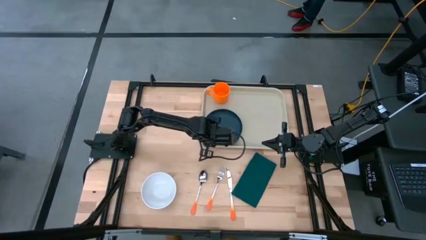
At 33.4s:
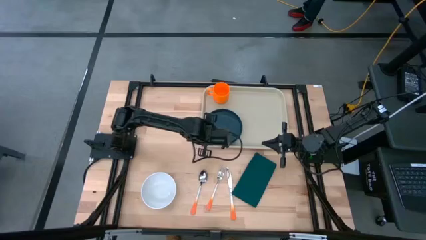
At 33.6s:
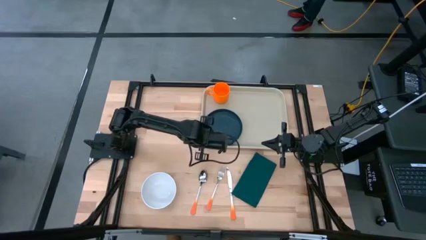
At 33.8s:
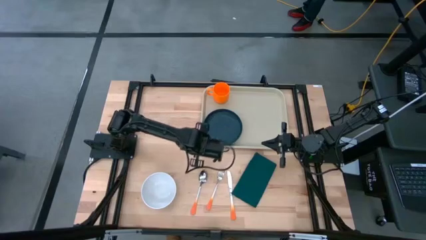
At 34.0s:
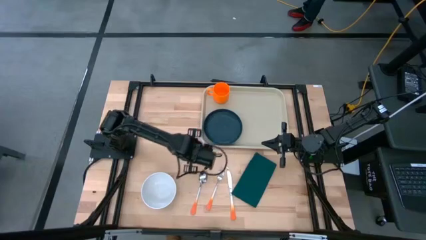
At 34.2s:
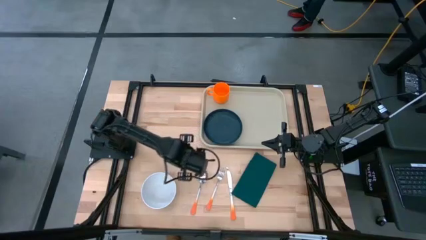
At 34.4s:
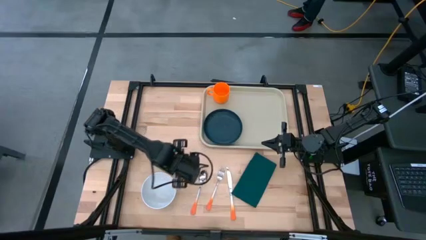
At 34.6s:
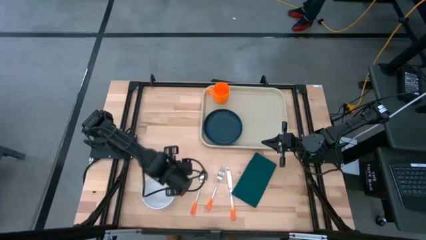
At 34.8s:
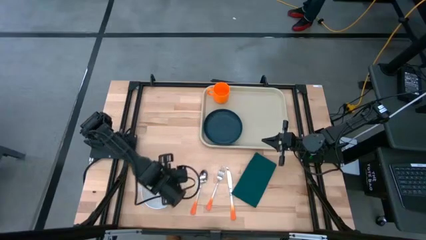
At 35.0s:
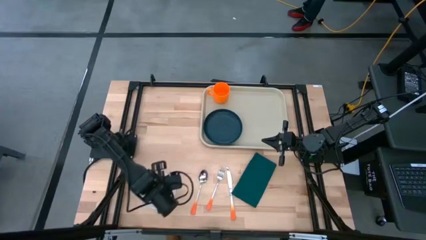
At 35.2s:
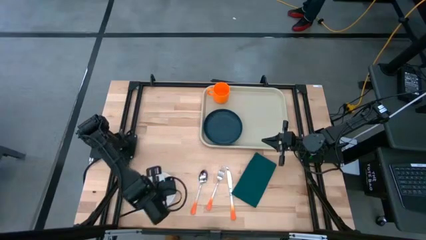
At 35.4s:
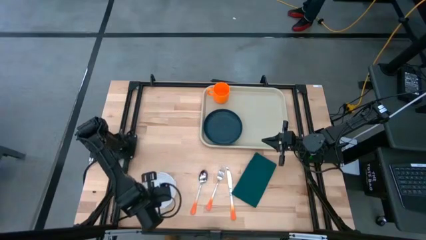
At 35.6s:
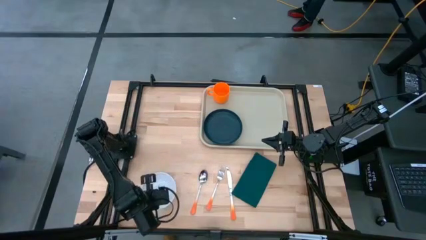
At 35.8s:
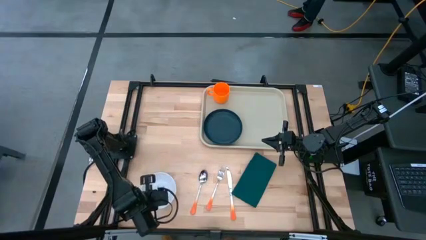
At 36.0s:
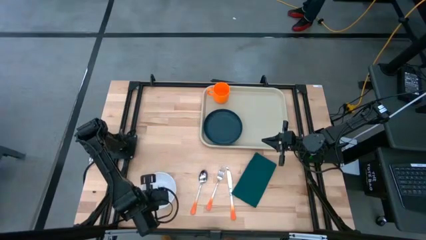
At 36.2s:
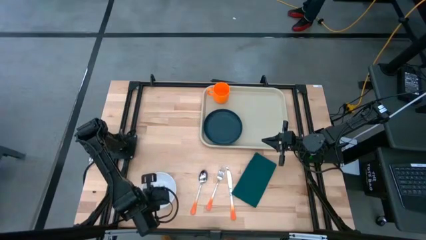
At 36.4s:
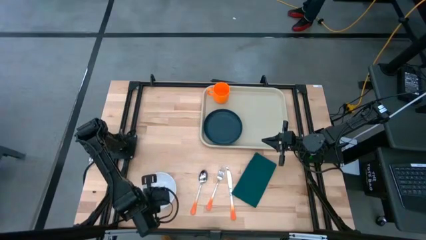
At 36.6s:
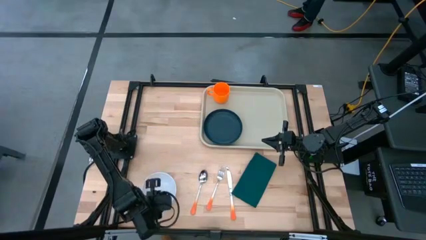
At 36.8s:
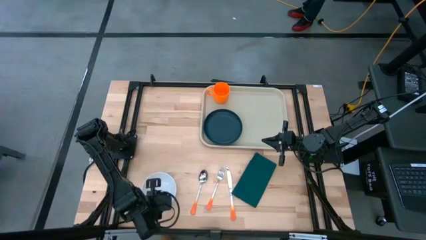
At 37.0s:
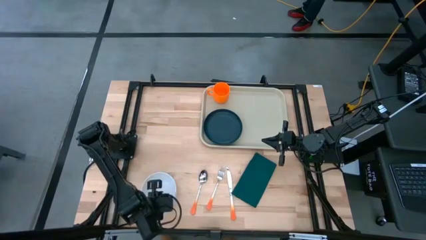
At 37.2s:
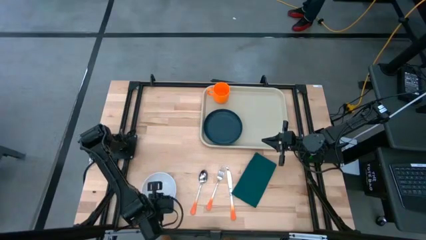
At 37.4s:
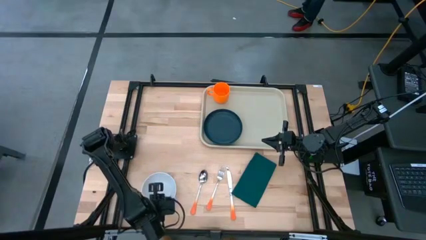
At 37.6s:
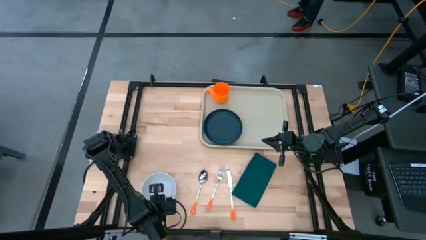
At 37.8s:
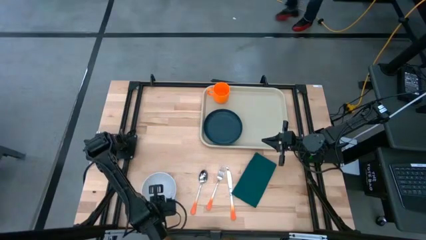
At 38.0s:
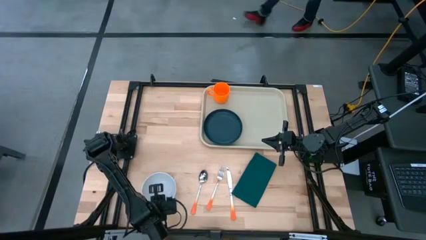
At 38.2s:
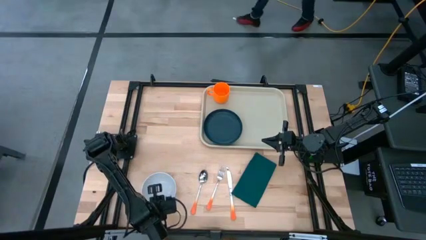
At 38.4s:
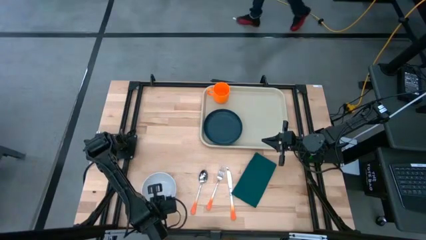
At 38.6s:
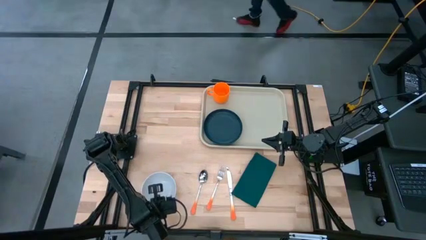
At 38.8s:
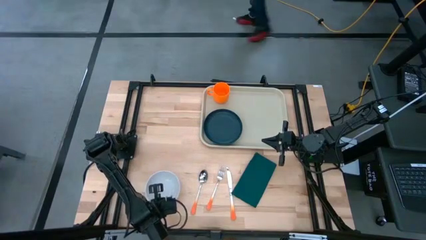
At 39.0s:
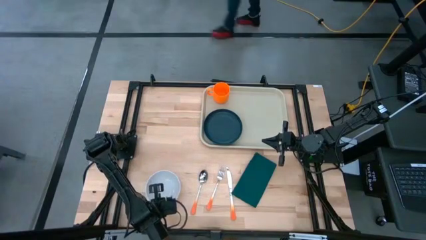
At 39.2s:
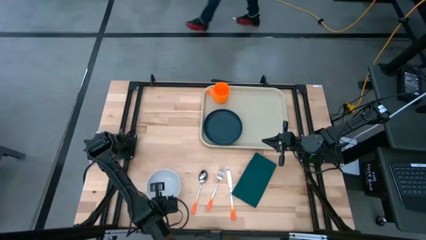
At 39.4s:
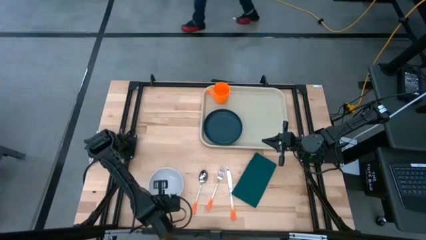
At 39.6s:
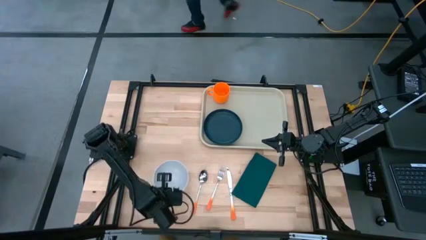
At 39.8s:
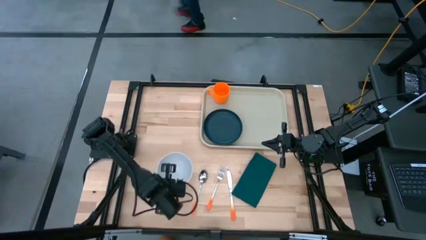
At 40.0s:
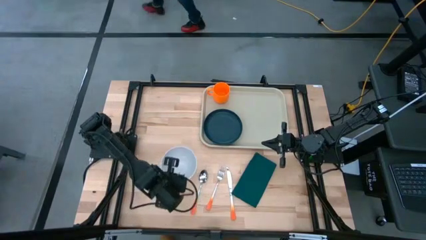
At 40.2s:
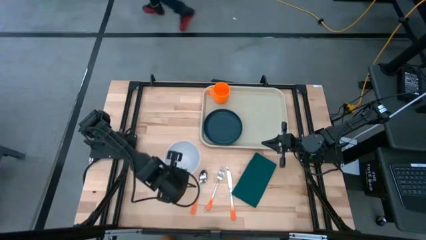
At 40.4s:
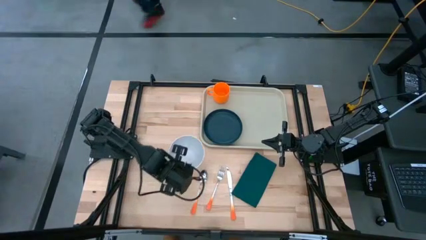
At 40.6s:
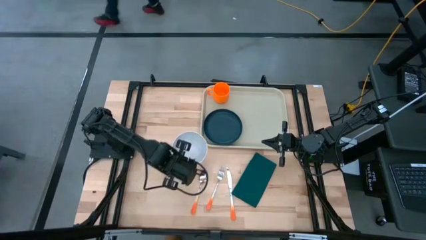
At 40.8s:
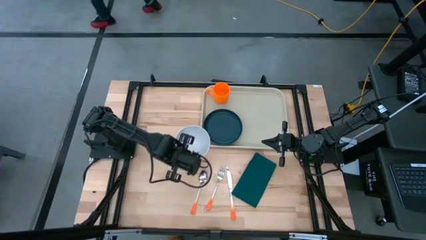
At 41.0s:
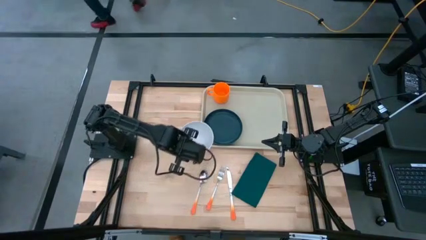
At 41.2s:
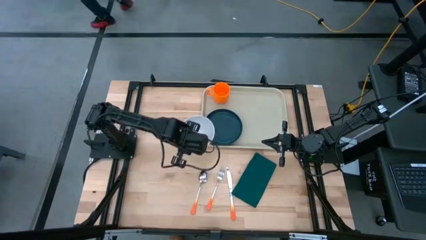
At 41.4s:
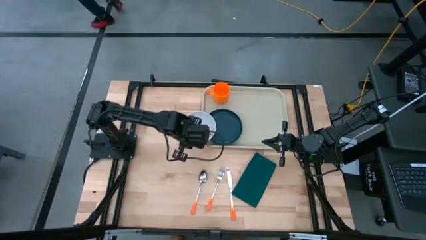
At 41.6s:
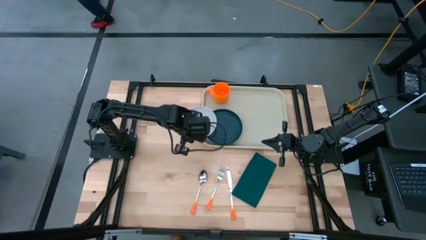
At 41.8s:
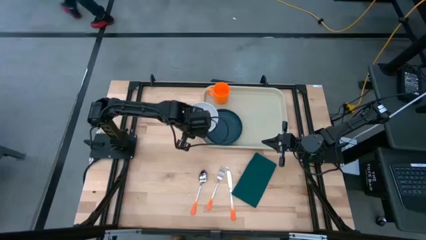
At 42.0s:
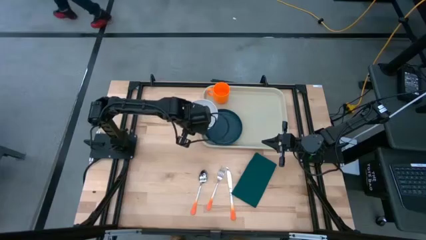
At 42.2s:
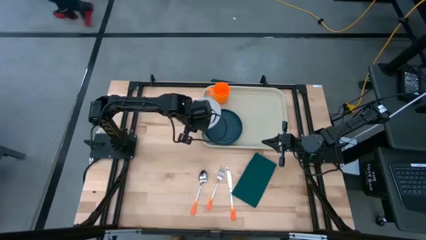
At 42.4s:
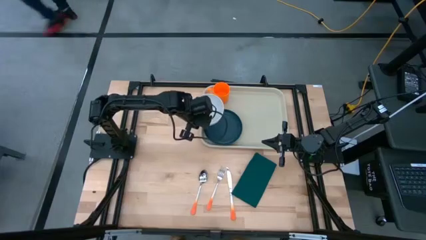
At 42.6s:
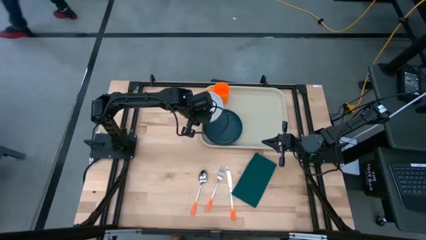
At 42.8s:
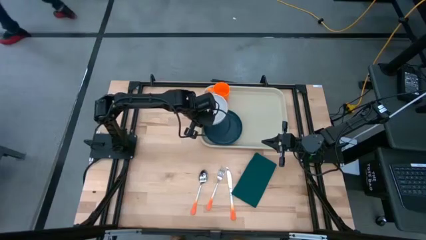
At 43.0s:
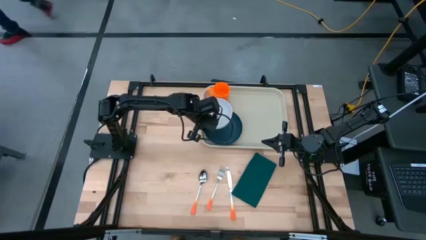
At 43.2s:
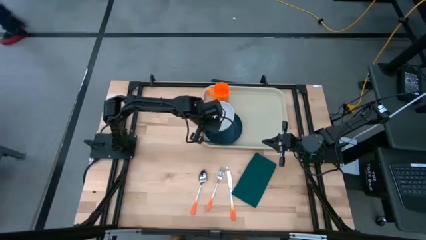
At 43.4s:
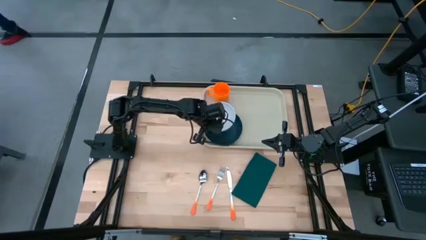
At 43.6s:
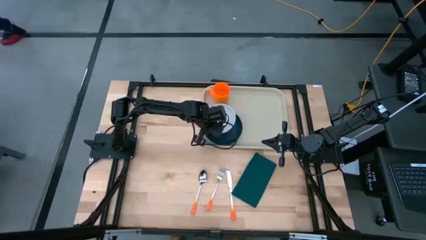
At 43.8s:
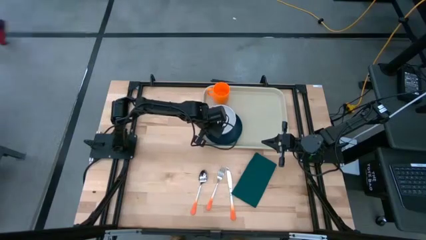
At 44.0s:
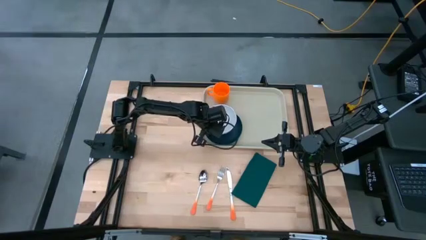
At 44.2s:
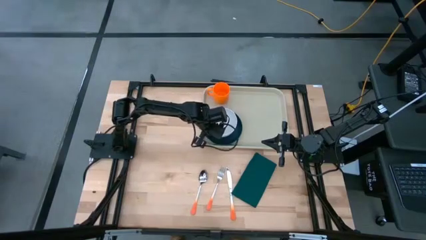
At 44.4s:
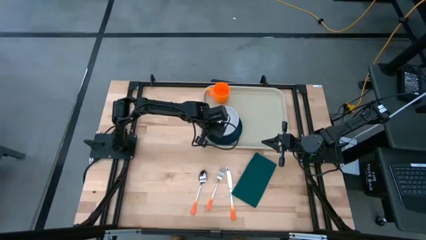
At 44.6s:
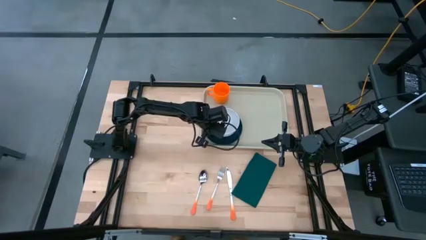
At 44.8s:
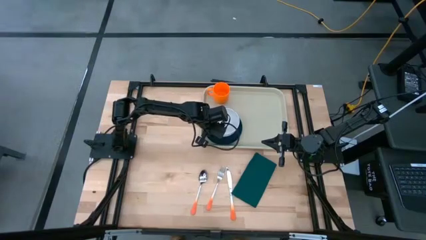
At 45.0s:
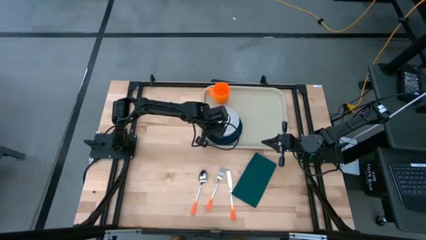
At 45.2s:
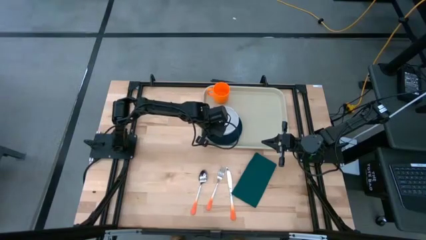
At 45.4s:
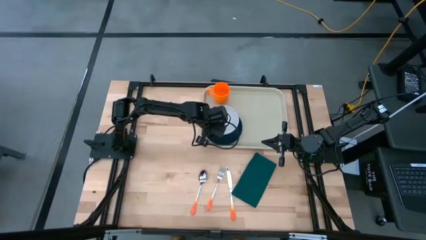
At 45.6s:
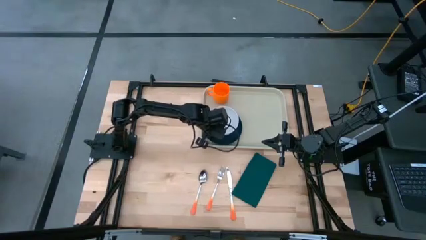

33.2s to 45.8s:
Task: Set up tray
Put the white bowl on the blue plate on the serving tray

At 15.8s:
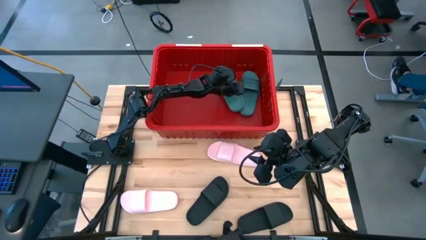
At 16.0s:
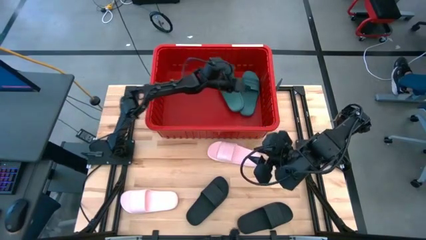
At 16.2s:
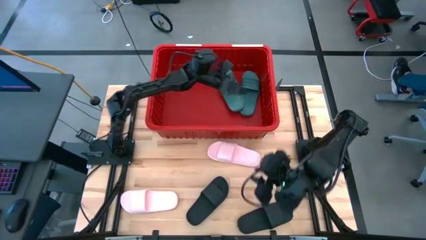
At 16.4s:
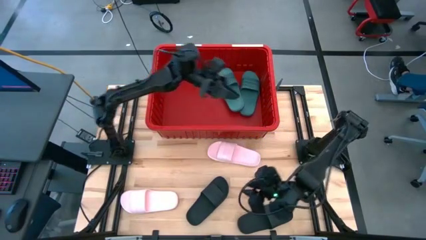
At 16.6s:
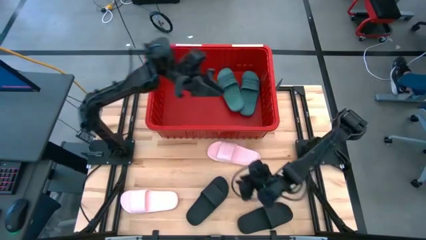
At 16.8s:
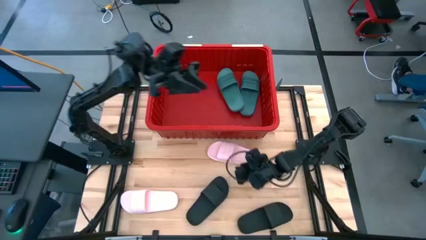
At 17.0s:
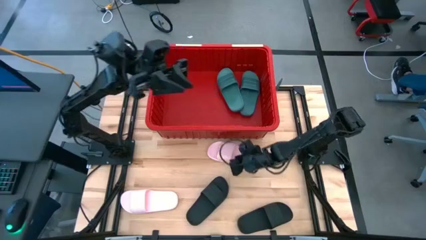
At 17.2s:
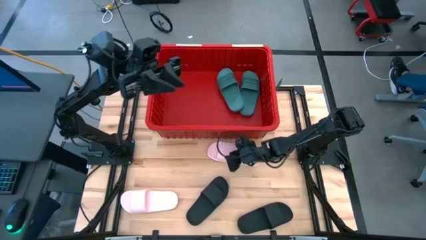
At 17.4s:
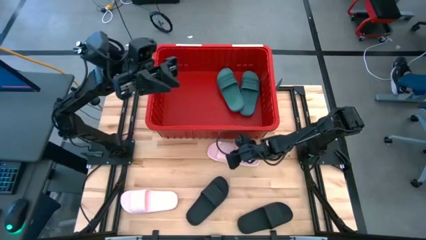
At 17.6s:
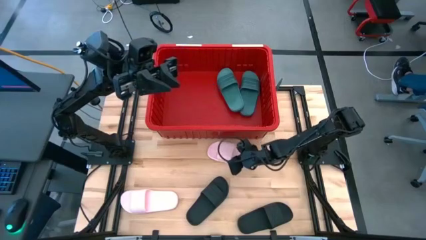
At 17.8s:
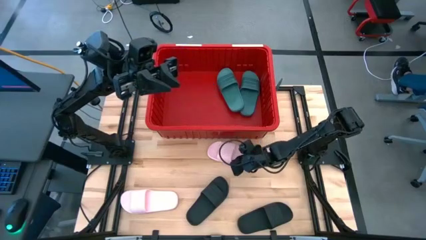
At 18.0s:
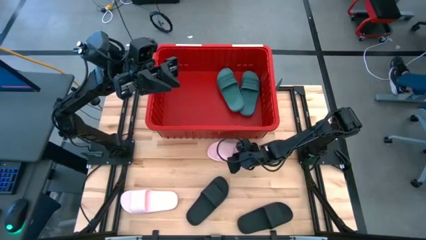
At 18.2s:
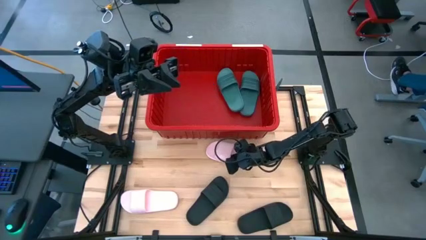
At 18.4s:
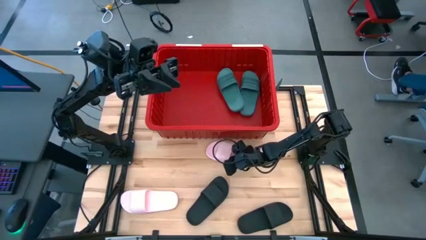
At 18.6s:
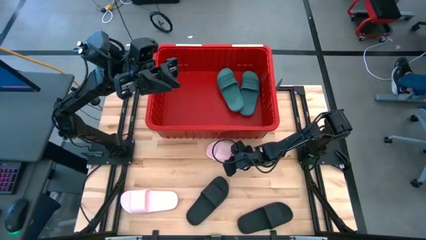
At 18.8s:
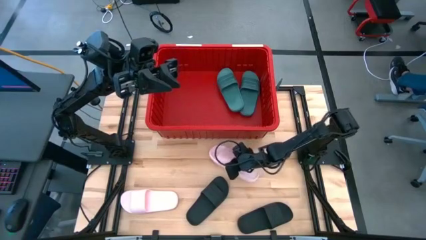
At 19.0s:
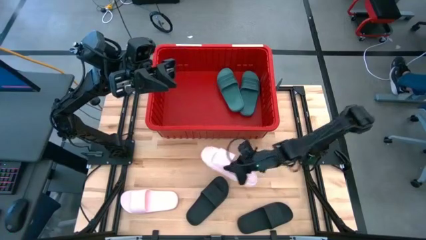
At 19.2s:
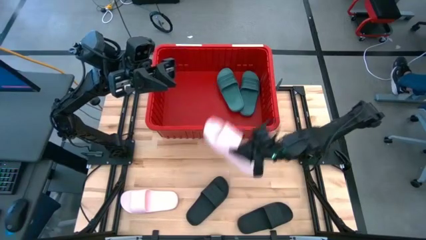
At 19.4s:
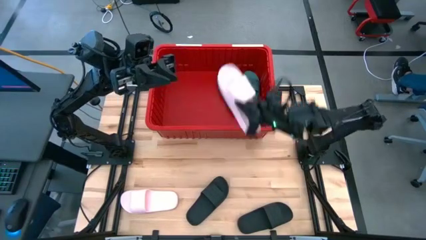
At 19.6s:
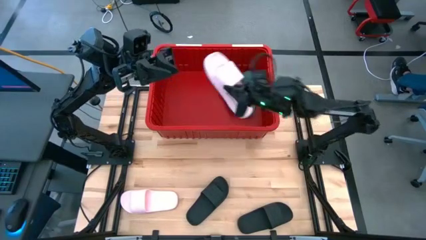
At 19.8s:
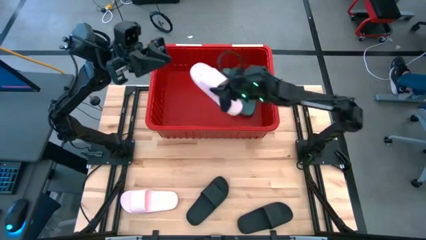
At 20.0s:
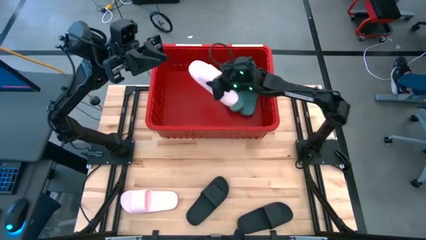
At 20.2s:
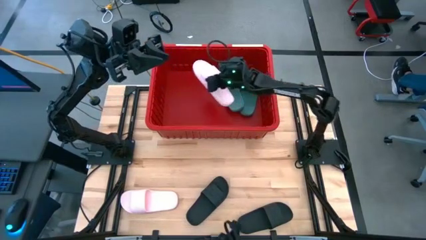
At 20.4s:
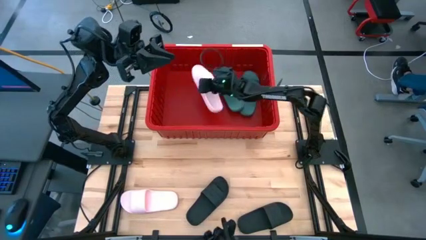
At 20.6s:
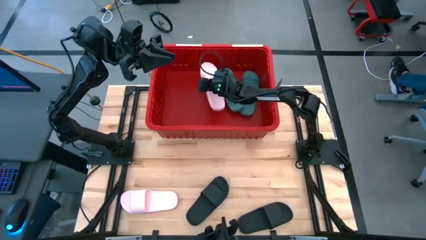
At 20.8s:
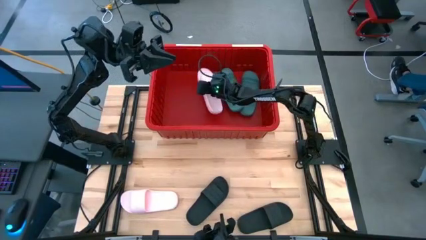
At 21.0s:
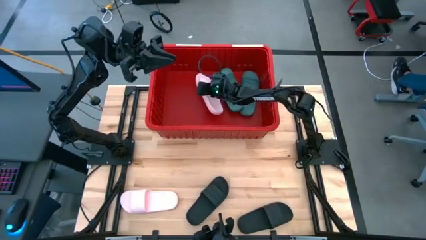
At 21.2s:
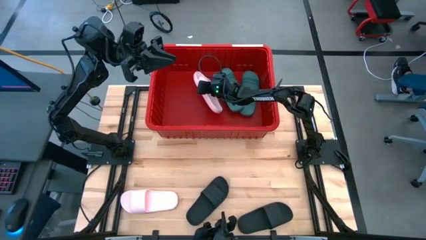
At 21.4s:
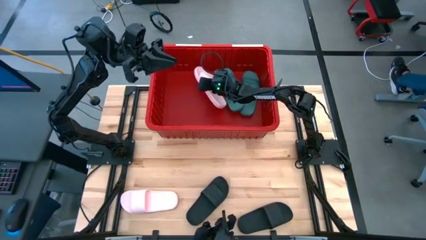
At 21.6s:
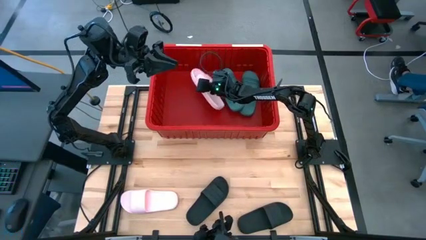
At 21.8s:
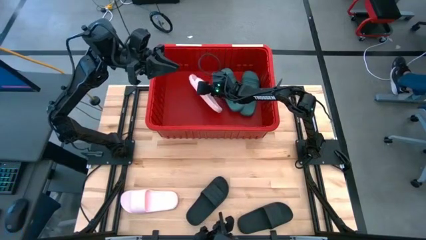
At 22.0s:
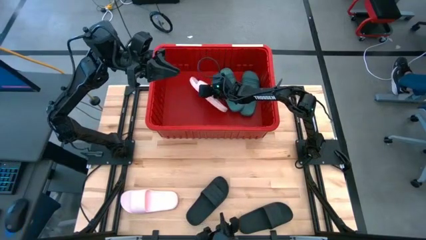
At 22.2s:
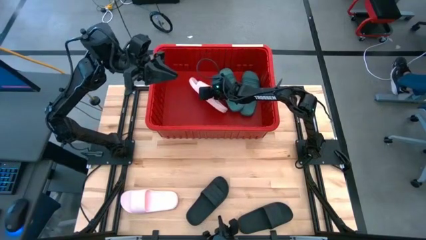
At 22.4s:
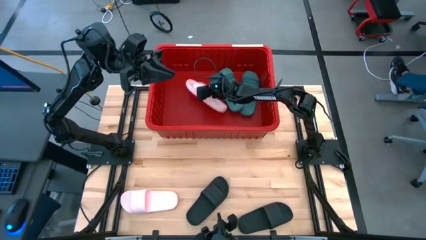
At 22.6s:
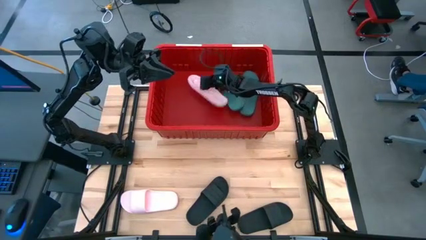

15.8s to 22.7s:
Task: Pick and place slides into bin
Put the top pink slide into the red bin
